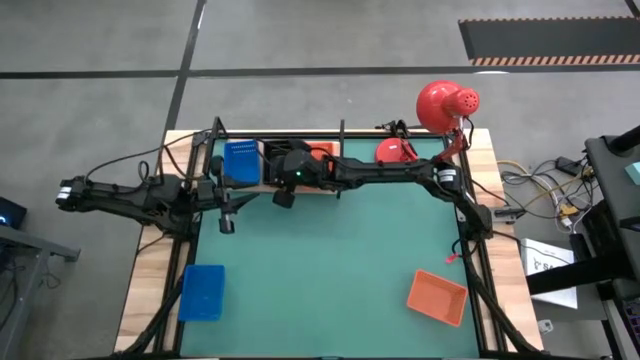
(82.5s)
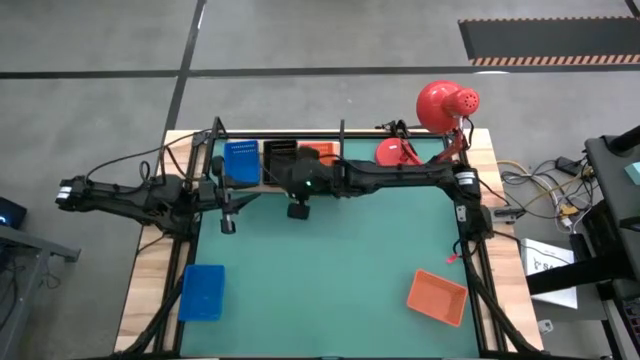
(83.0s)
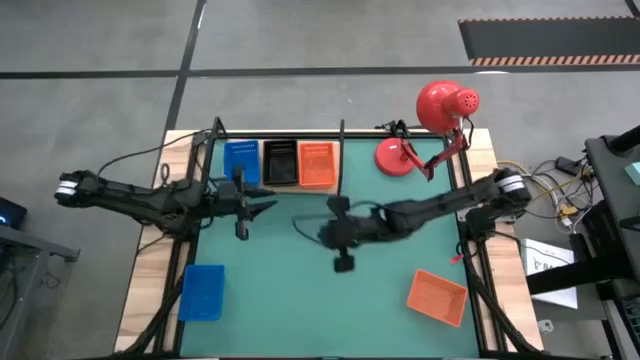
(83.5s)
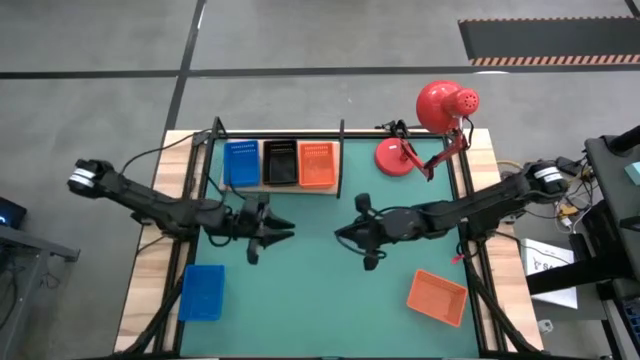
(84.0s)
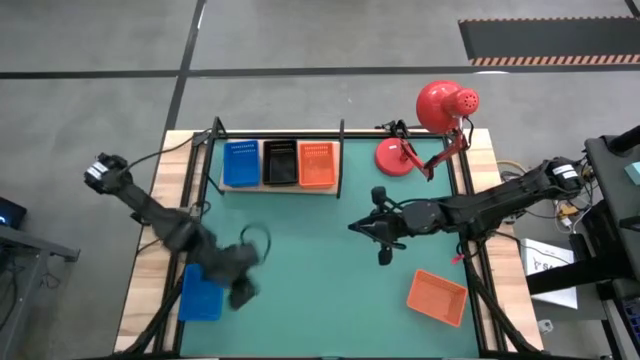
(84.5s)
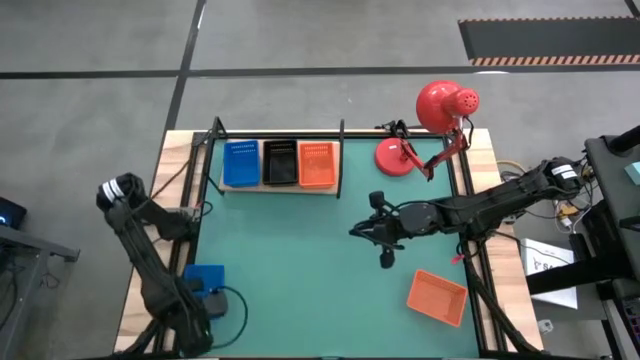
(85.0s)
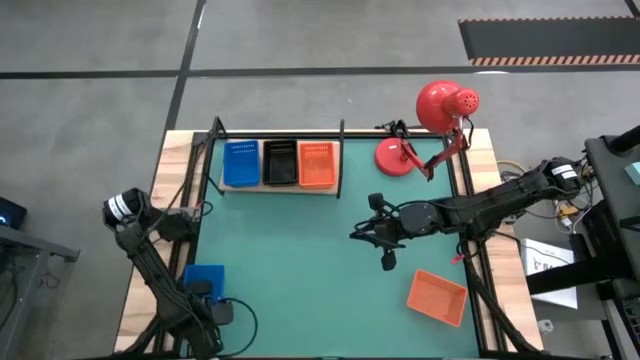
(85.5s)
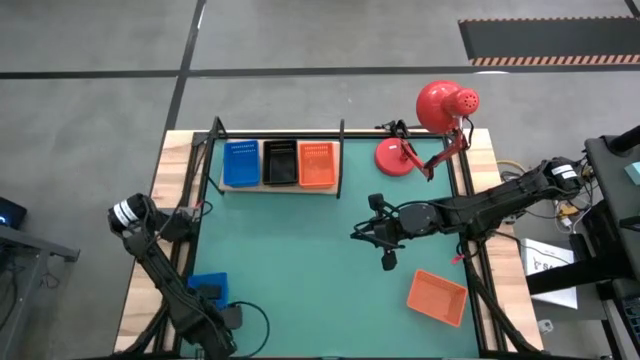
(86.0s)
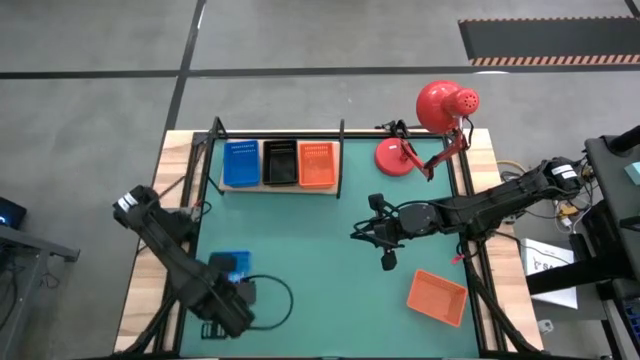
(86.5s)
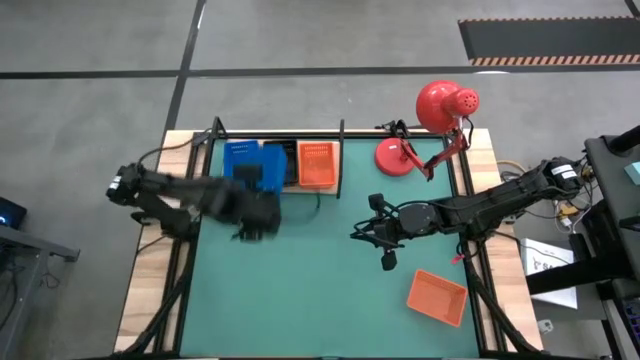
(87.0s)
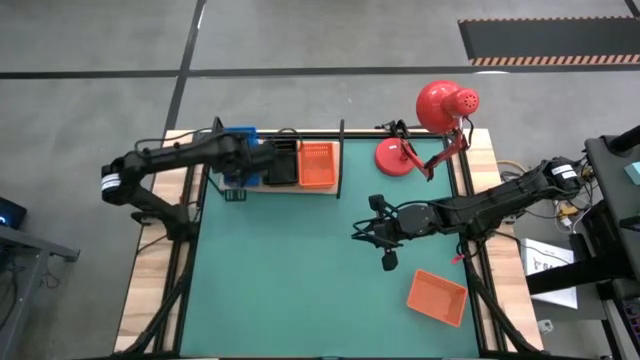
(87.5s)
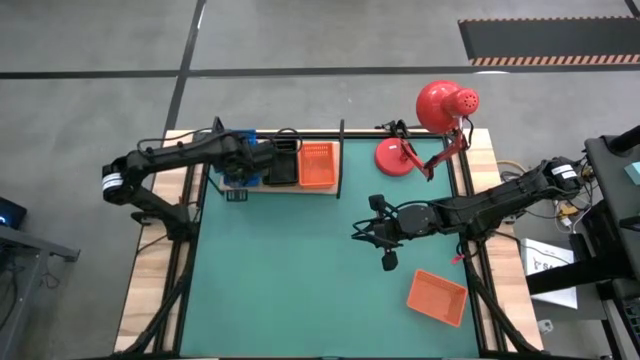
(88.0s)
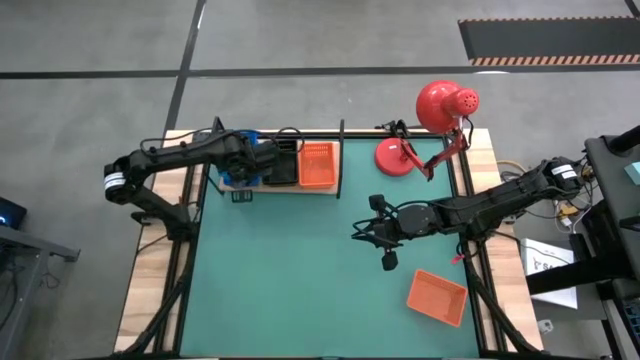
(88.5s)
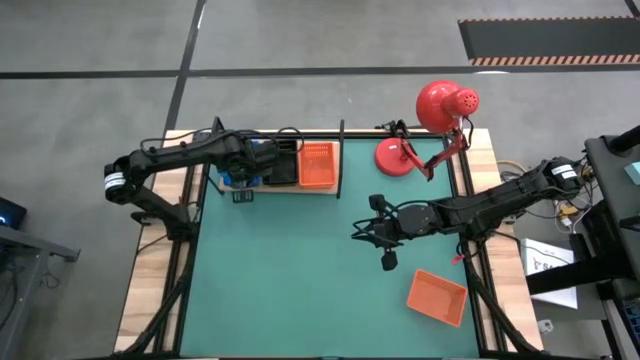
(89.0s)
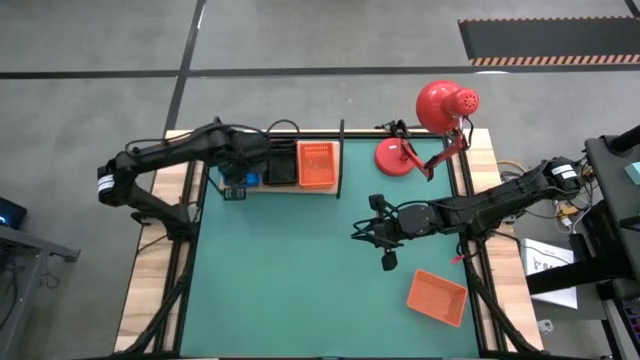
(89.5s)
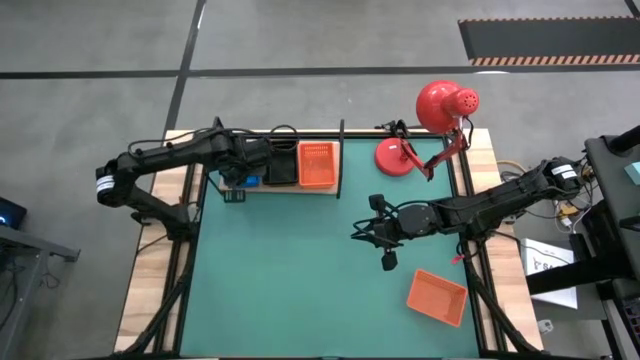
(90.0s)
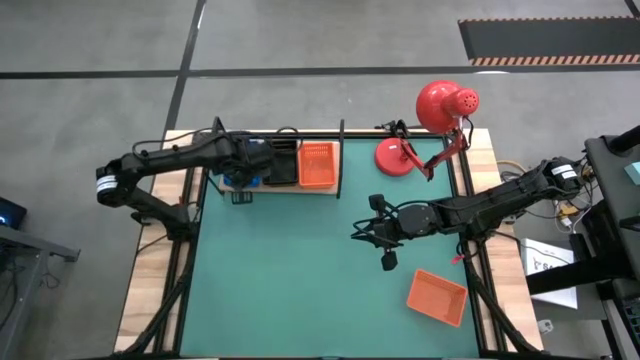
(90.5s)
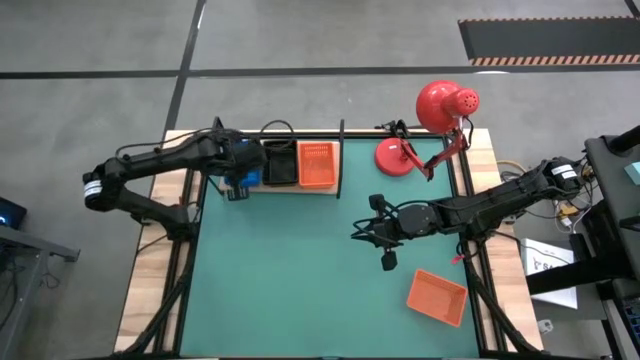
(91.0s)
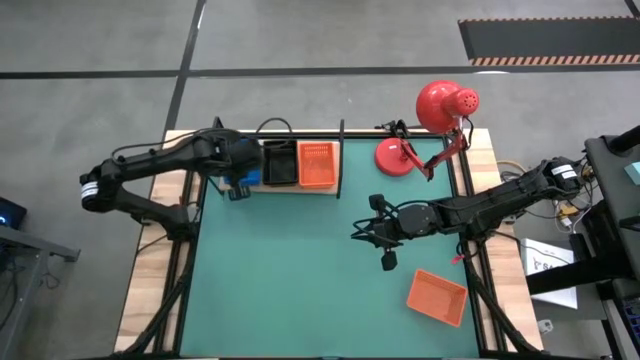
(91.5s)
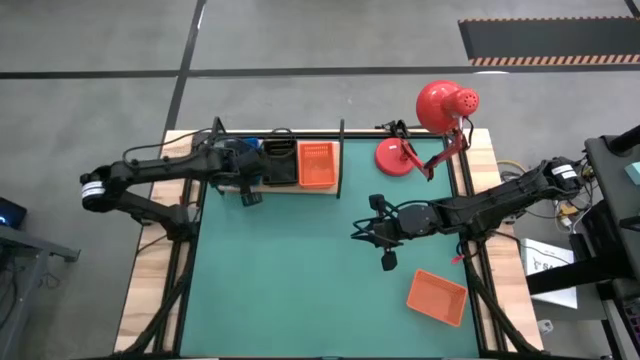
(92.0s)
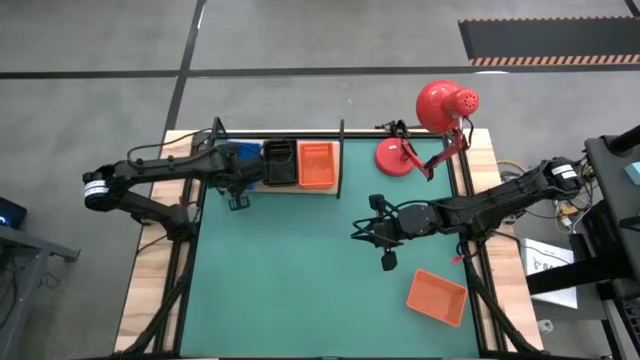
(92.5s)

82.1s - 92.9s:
Task: Stack baskets on shelf by color
Stack the blue bin on top of the blue bins on the shelf

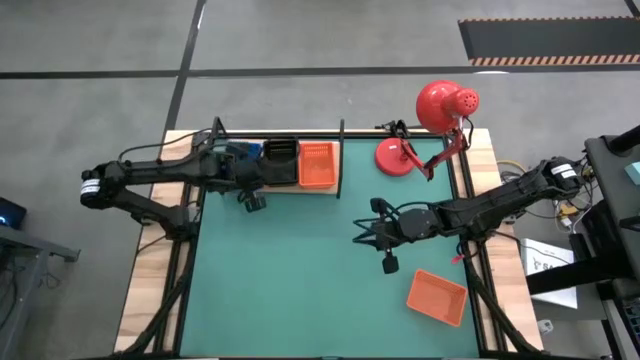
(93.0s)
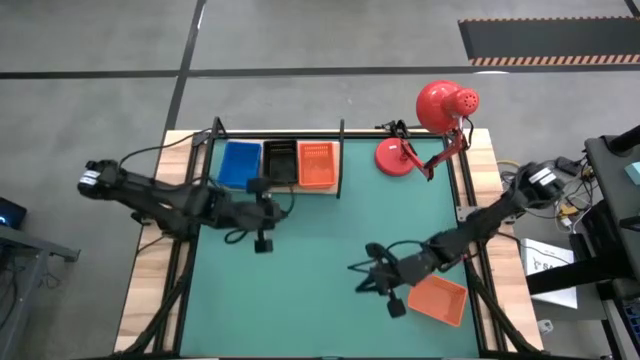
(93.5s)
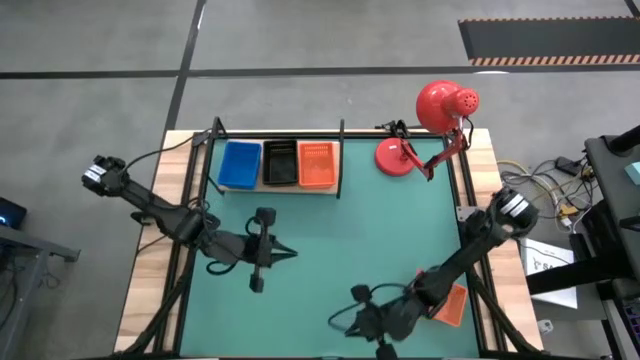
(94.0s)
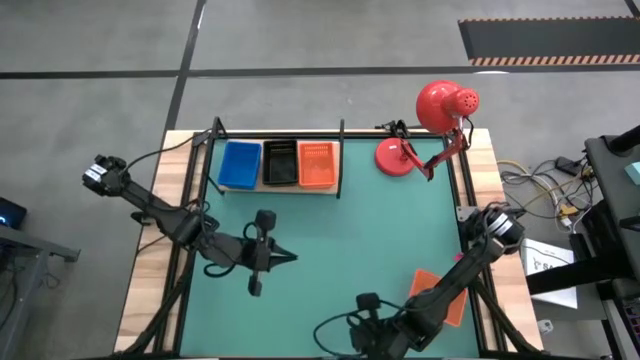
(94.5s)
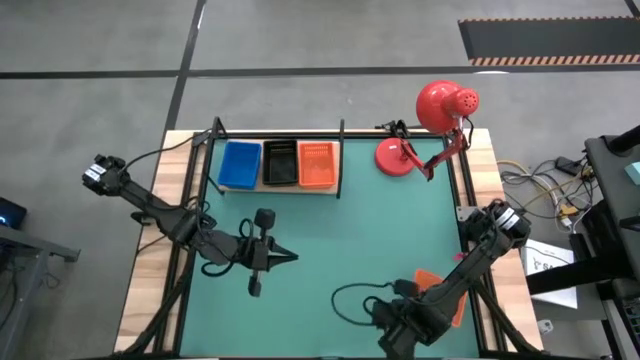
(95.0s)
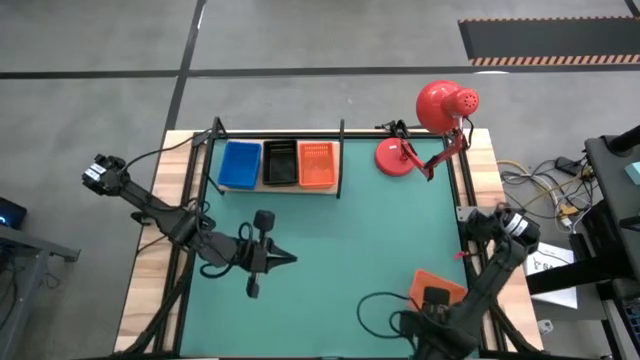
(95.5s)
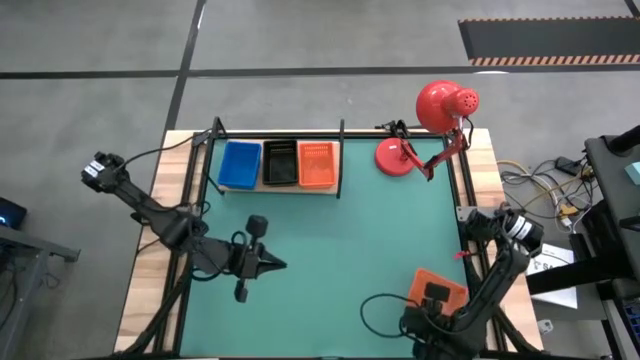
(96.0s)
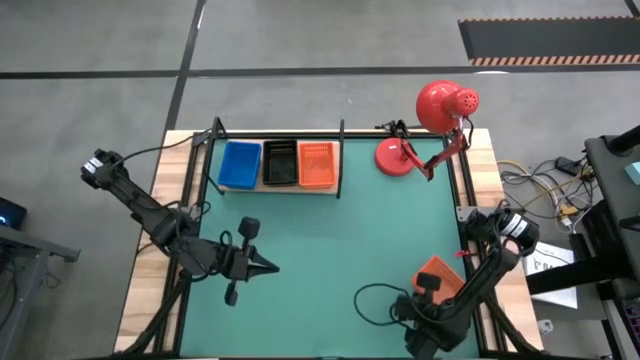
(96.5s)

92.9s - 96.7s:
Stack the orange bin on top of the orange bins on the shelf

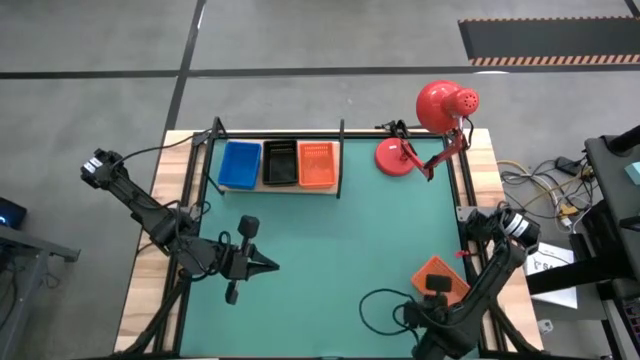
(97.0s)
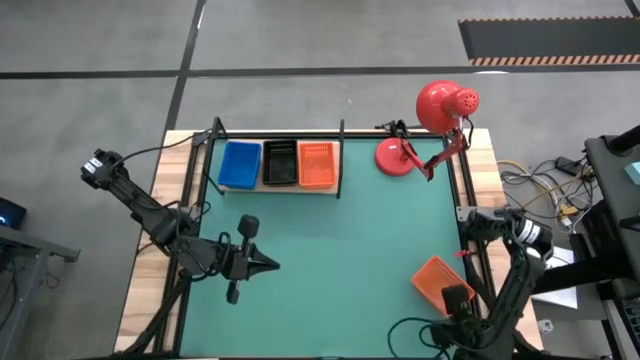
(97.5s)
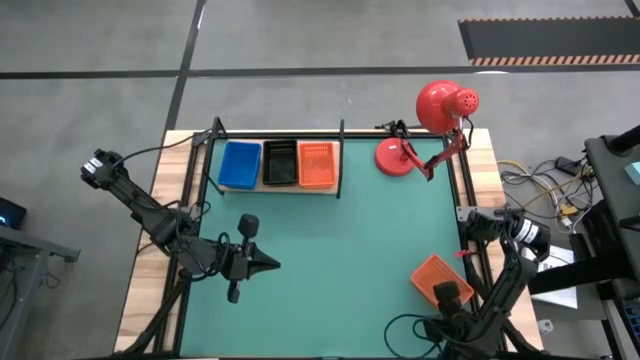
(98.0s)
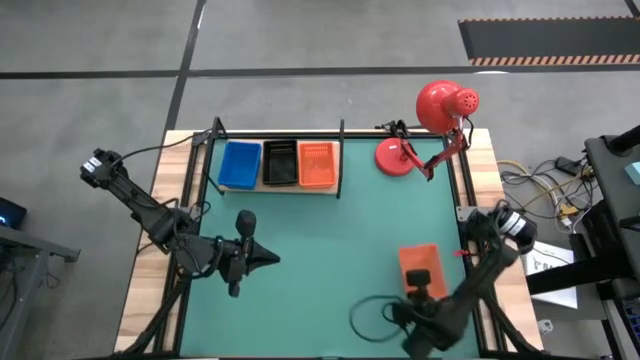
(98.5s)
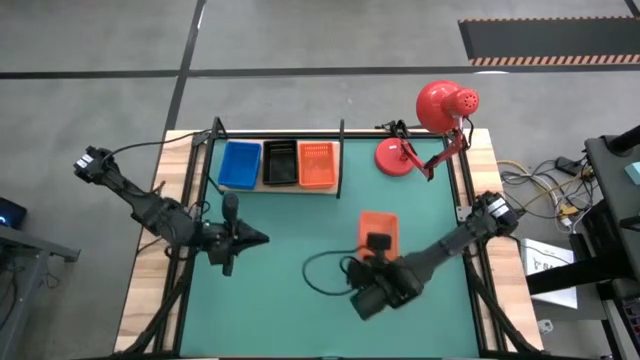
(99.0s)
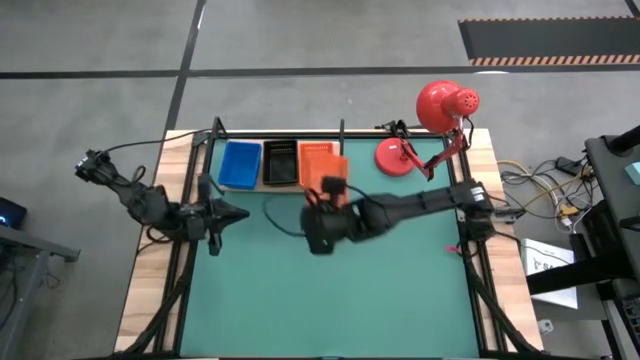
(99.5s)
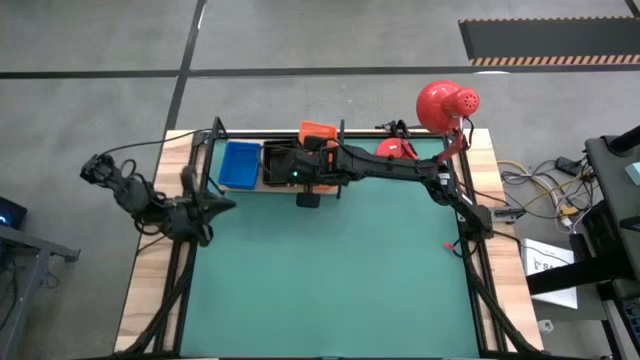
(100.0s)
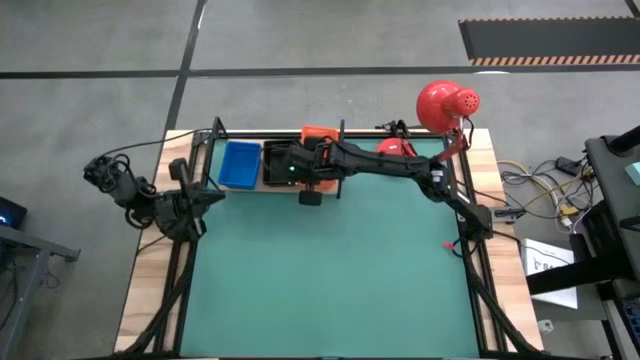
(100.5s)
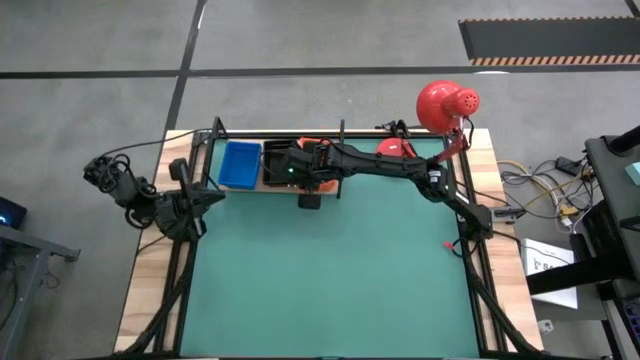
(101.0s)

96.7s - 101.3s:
Stack the orange bin on top of the orange bins on the shelf

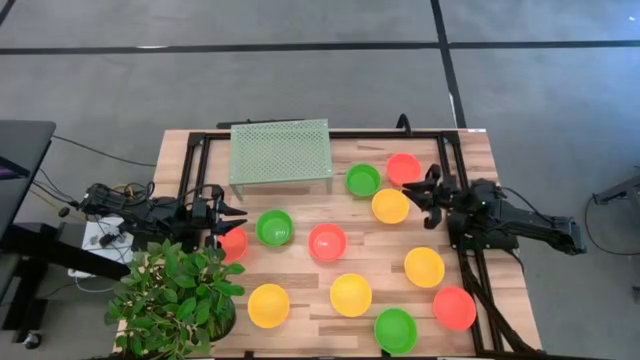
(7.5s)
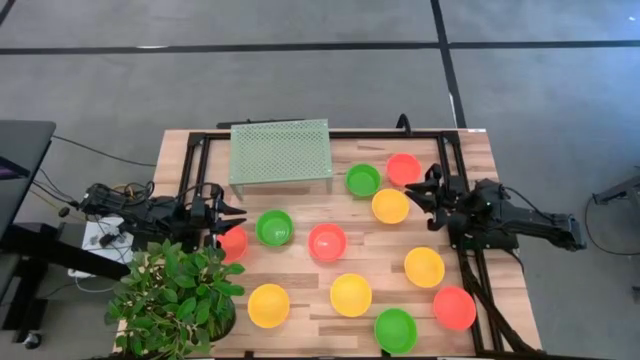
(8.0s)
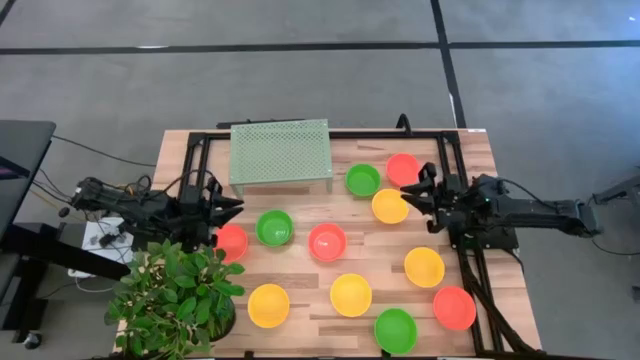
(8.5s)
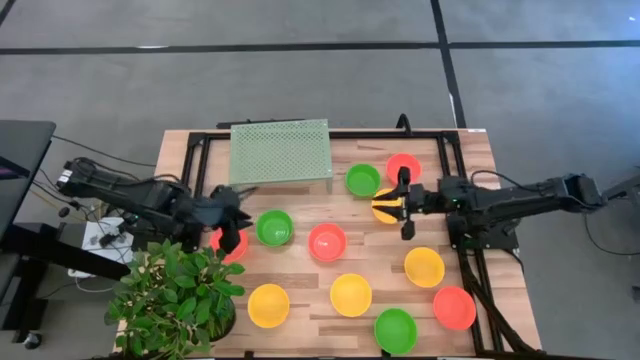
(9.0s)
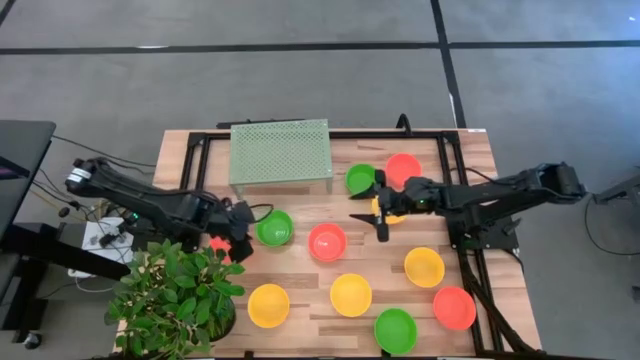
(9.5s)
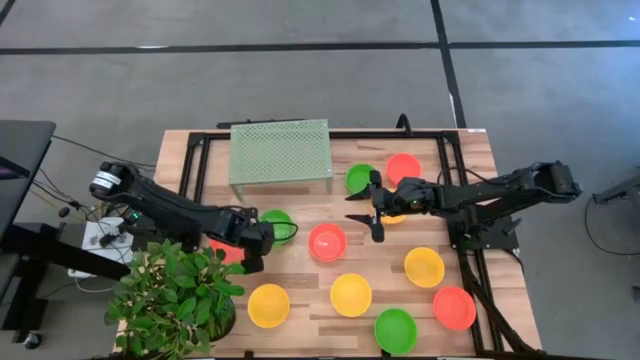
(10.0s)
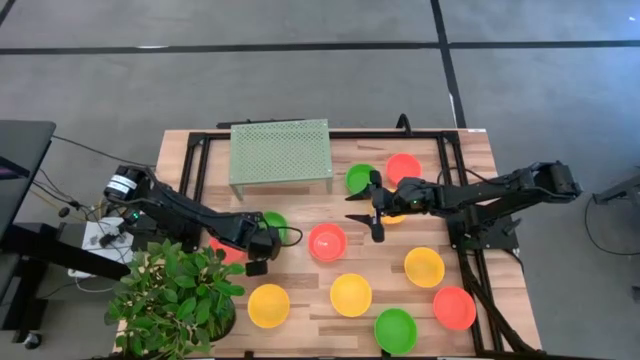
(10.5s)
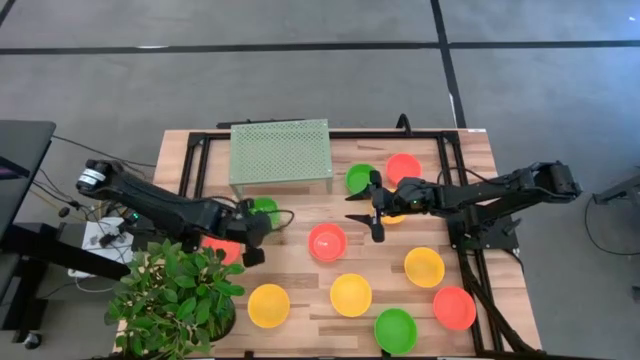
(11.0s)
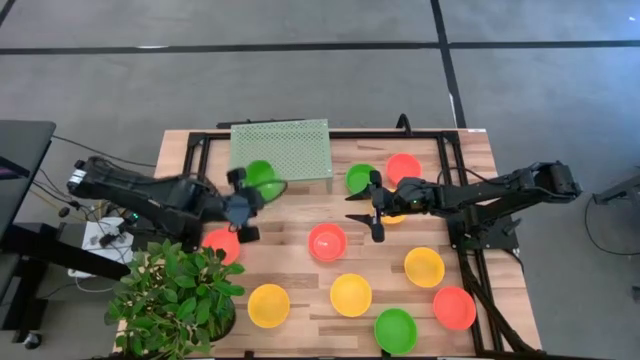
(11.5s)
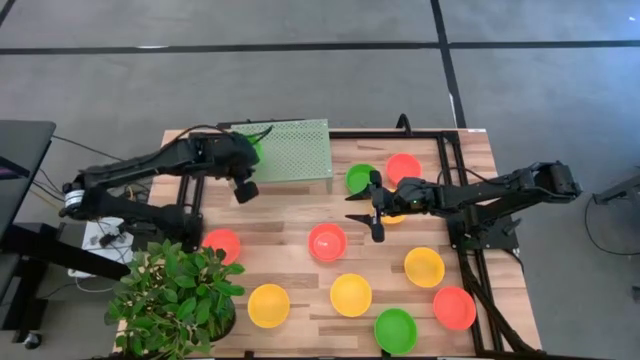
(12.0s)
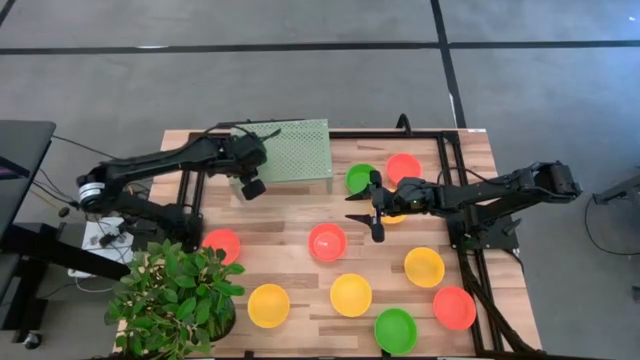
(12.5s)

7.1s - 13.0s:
Task: Pick & Place Mini bowls
Put the green bowl on the shelf
